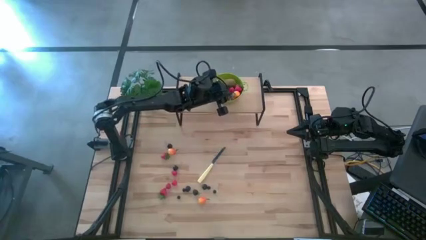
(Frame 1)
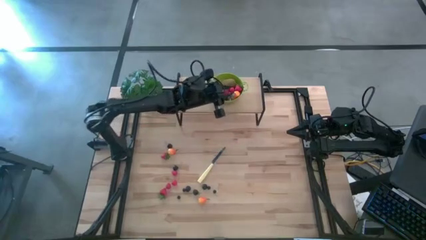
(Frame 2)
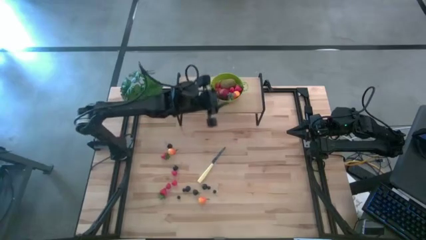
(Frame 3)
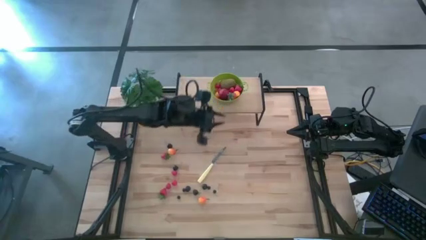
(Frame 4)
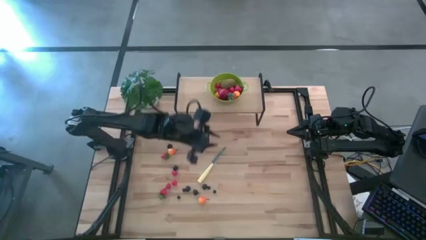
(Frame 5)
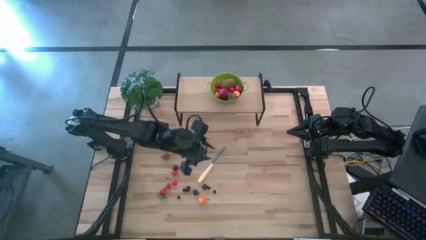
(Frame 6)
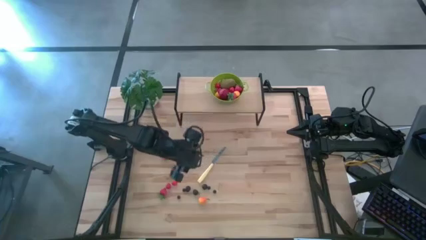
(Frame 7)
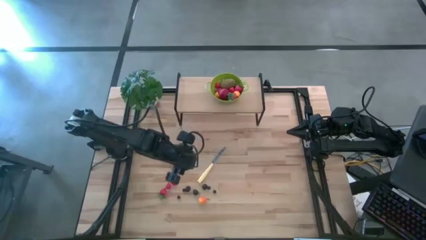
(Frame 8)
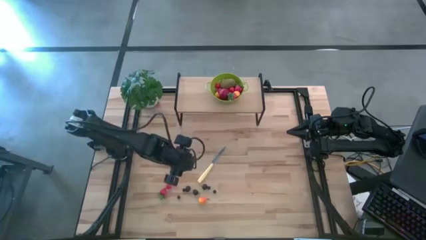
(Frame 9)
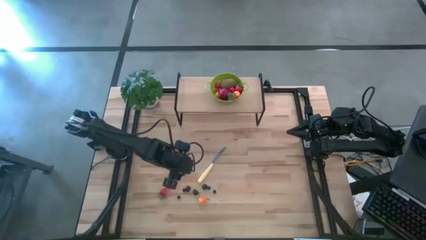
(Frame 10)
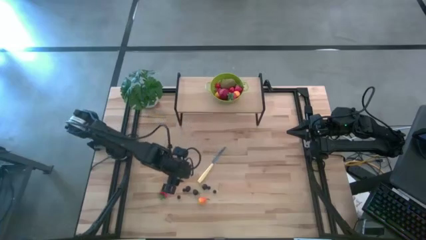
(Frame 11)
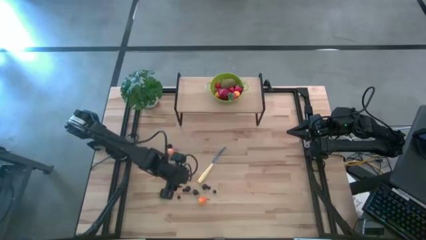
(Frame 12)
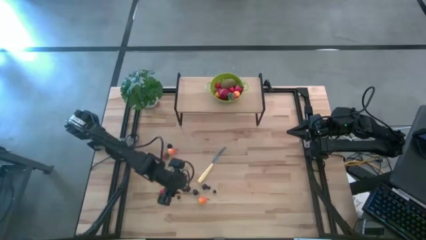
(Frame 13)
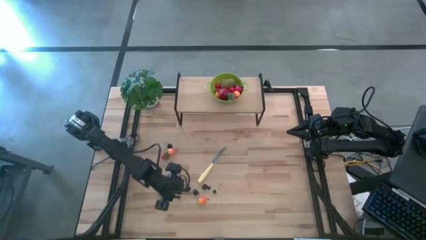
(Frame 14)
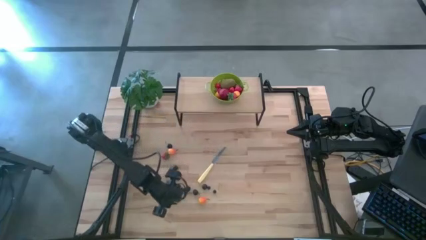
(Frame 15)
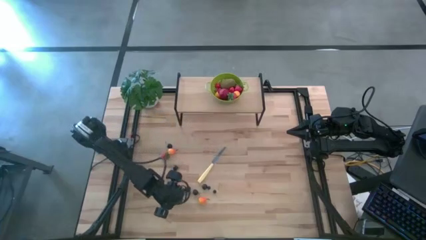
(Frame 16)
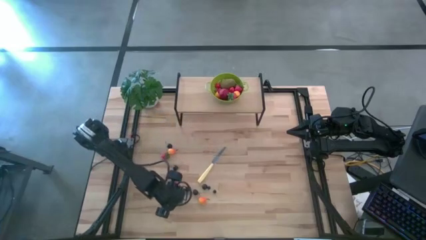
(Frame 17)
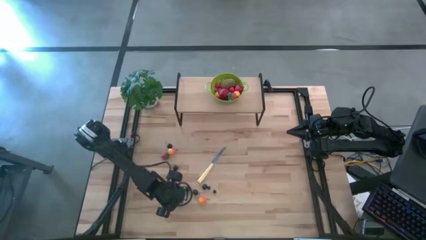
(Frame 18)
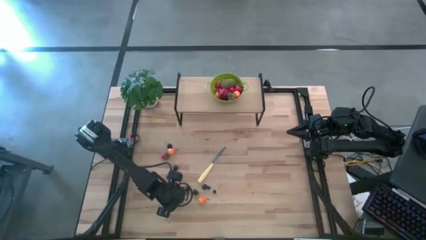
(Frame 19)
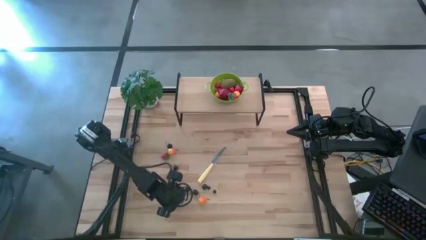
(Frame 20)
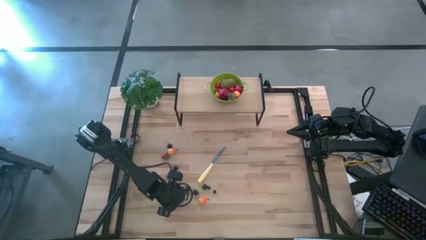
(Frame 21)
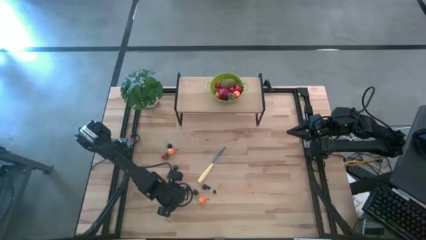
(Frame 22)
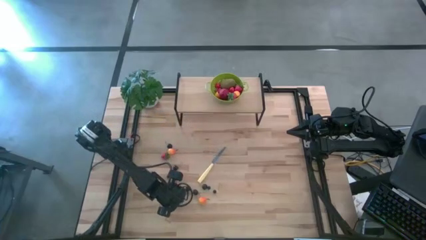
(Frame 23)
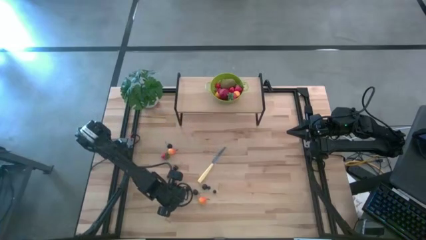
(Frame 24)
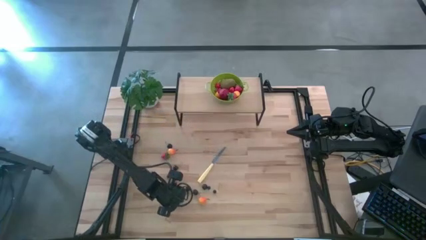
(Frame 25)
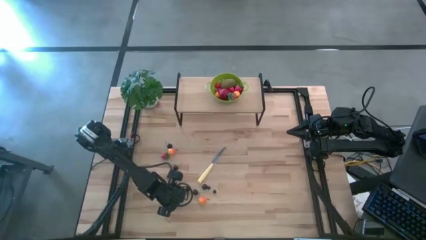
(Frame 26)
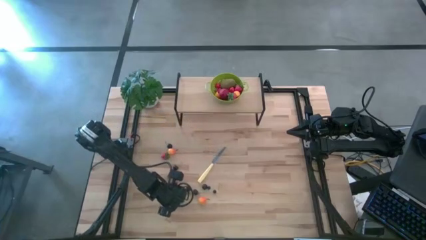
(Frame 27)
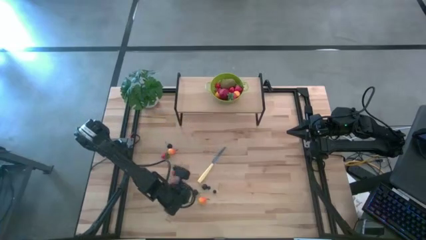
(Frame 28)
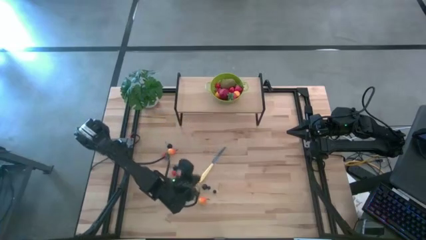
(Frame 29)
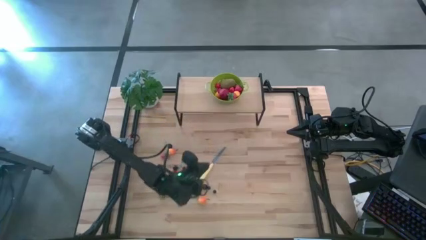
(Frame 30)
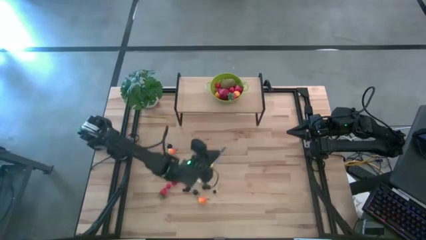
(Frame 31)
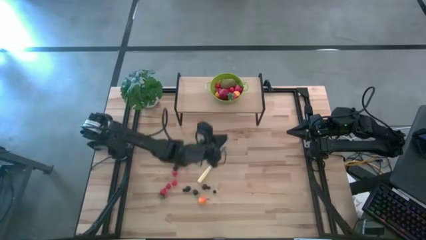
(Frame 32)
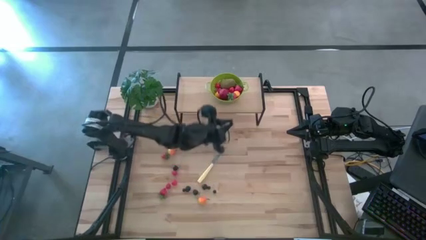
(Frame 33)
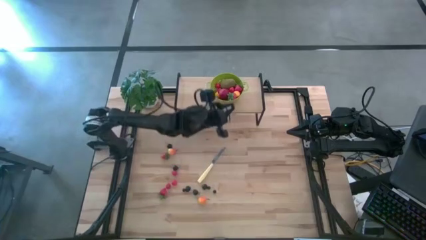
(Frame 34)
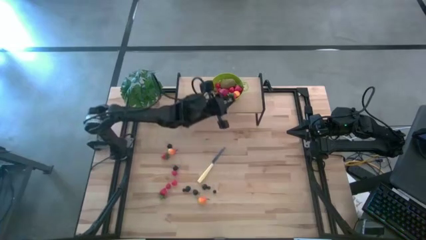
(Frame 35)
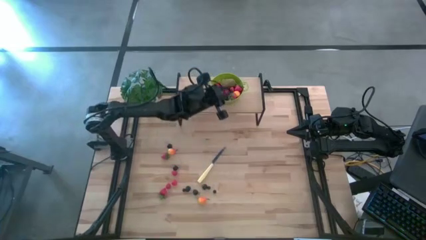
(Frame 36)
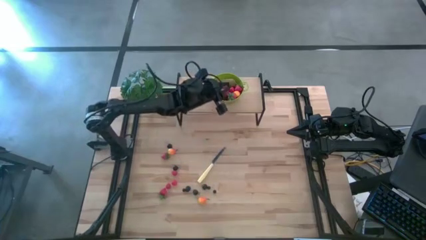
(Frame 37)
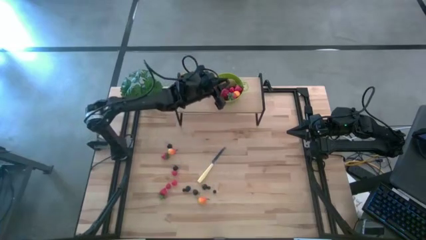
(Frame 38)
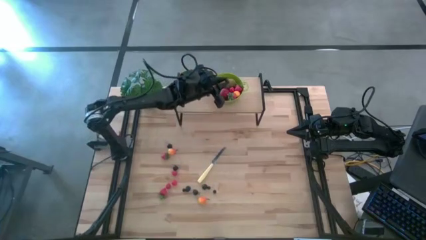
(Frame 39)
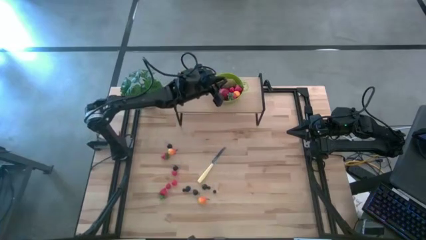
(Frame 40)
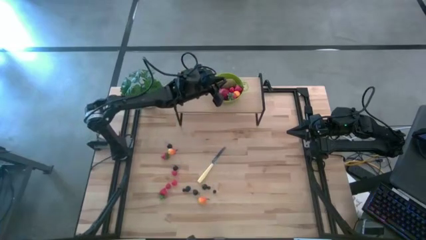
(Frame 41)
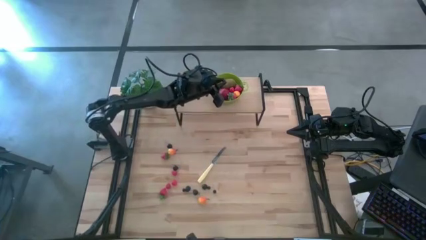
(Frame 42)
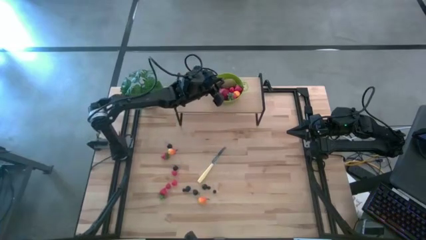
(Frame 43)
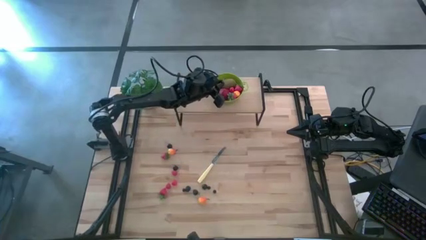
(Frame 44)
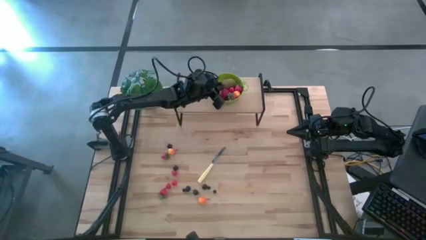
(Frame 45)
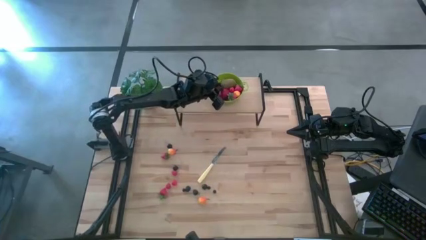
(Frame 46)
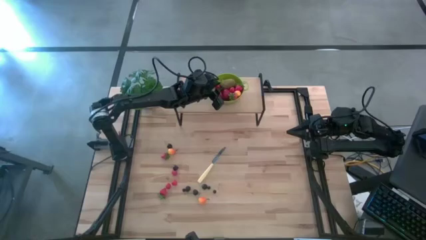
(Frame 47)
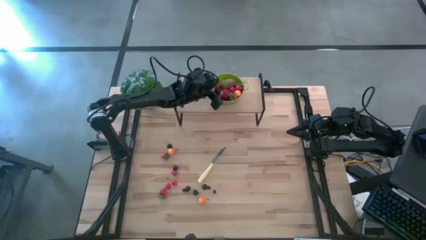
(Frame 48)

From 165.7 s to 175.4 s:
Task: Pick & Place Fruit
Put the blueberry into the strainer bowl

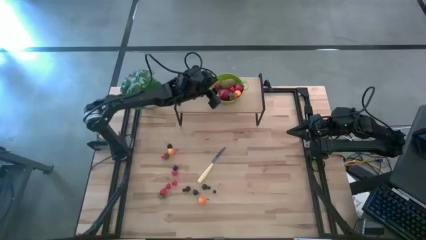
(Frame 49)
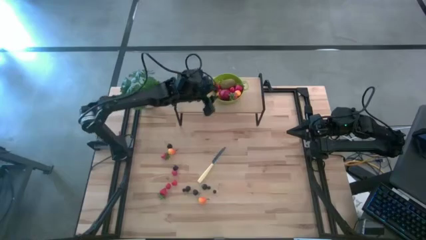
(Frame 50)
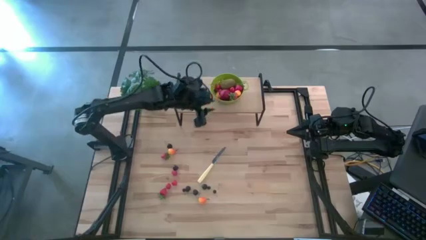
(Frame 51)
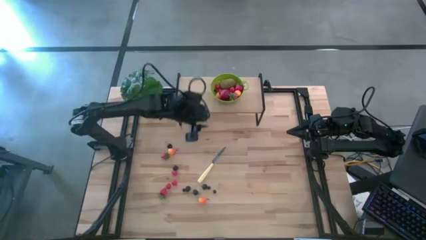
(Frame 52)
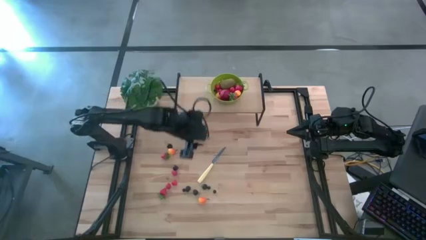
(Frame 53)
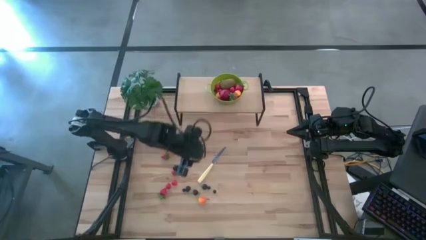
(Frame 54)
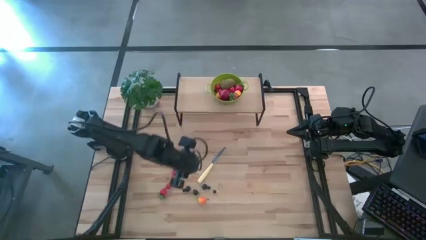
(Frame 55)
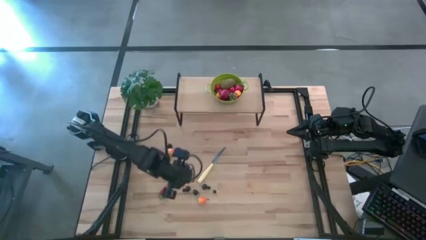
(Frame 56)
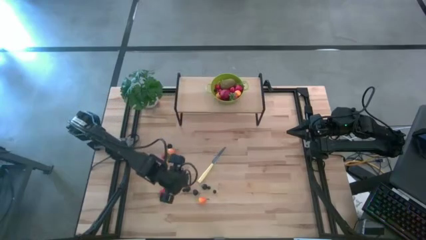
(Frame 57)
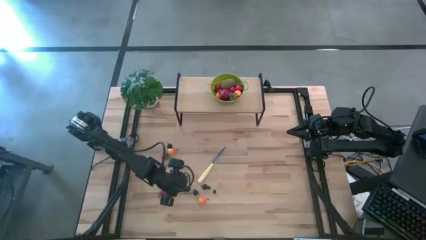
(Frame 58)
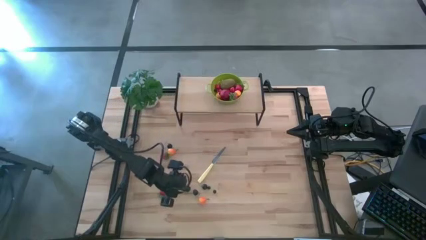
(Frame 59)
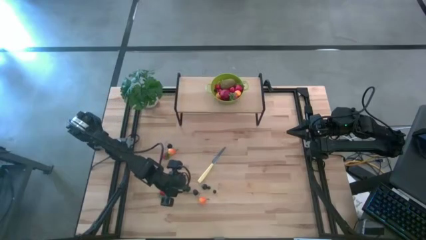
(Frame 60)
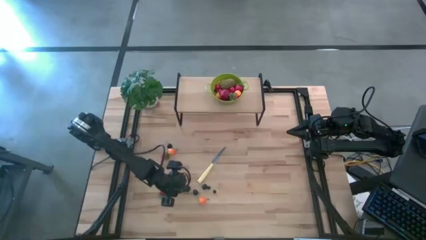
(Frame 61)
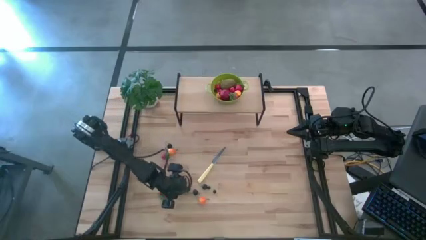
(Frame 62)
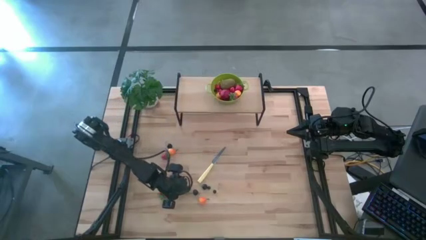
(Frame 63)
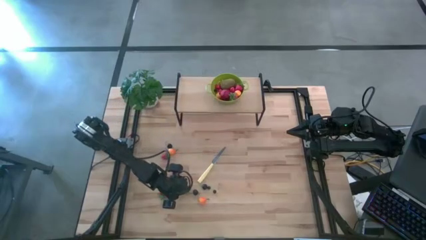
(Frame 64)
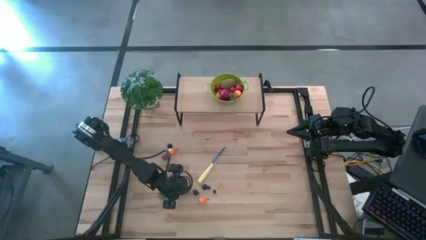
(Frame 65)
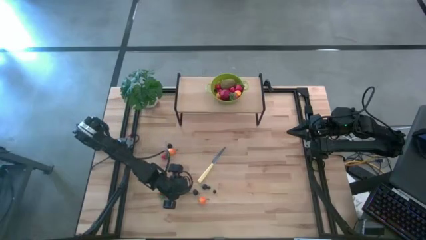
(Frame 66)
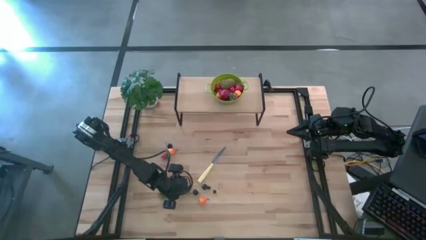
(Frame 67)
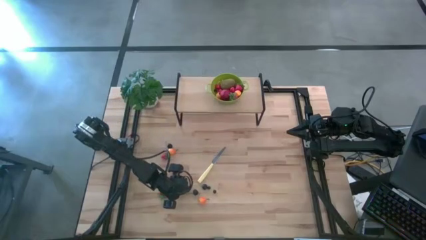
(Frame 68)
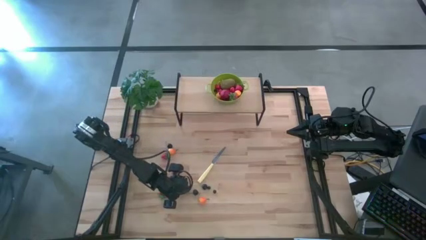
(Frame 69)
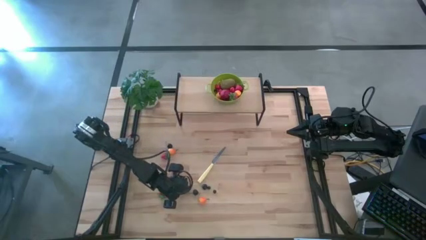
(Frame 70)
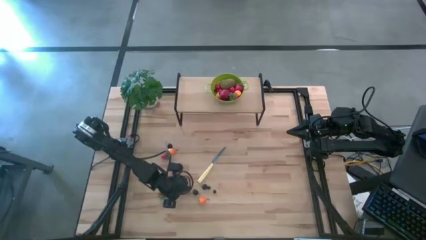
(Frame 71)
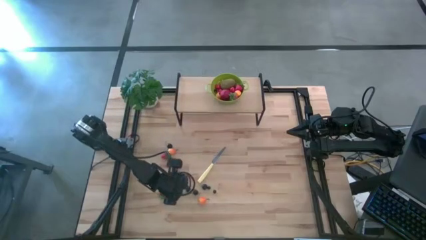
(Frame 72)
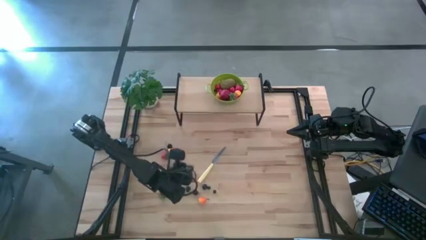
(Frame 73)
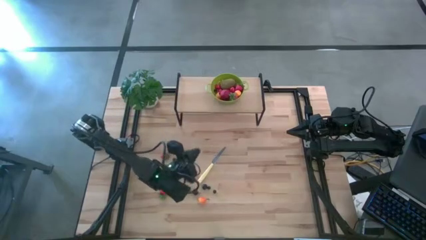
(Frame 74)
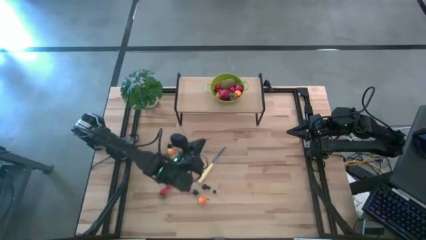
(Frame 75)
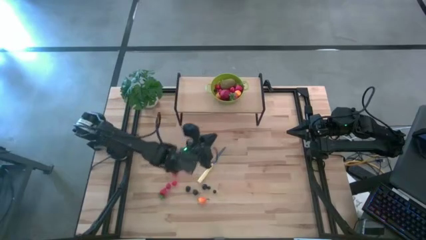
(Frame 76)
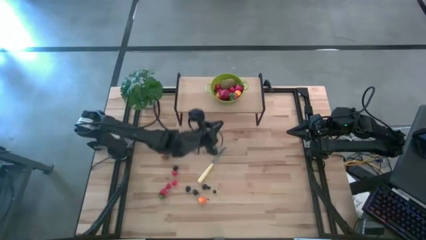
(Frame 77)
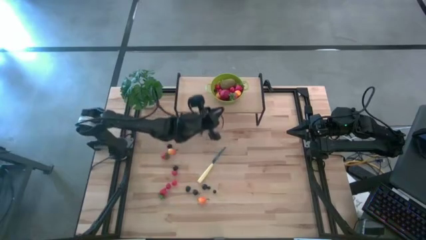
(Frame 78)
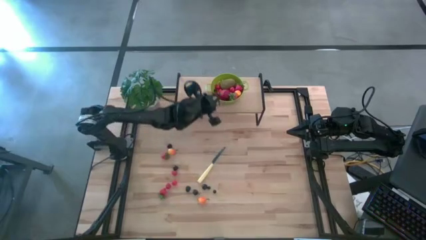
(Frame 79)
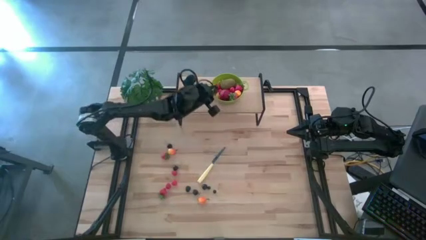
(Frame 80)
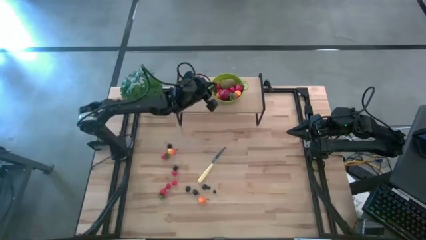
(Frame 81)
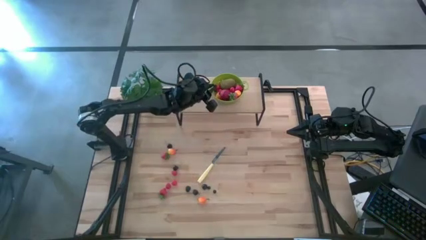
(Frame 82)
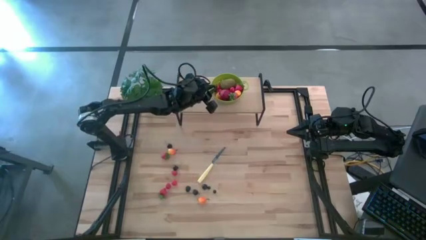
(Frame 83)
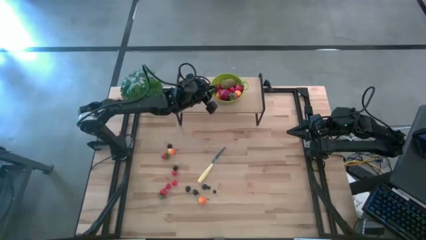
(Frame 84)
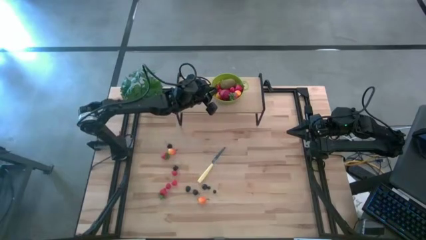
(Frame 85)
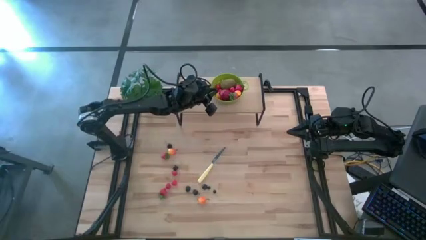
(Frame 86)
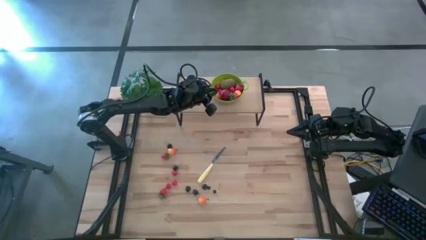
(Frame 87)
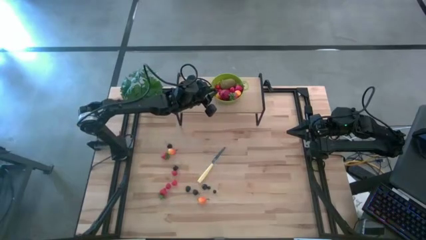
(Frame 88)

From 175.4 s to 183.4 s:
Put the blueberry into the strainer bowl
